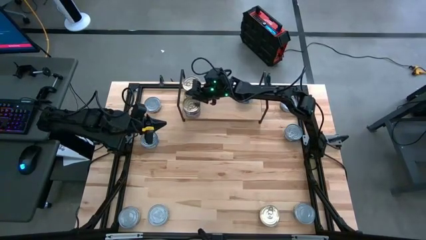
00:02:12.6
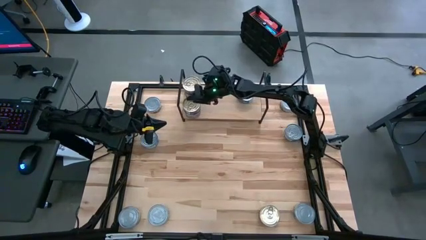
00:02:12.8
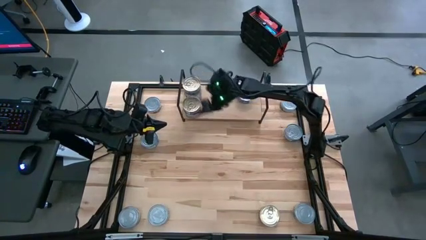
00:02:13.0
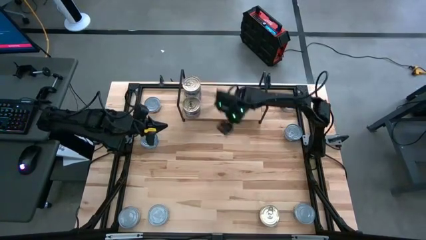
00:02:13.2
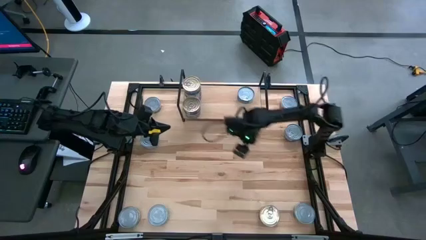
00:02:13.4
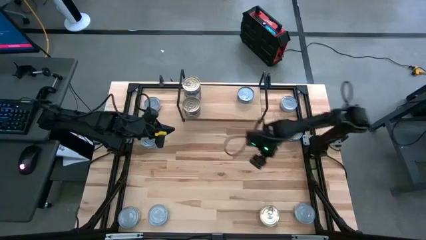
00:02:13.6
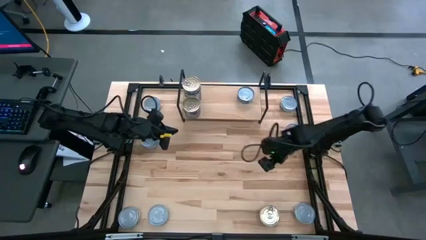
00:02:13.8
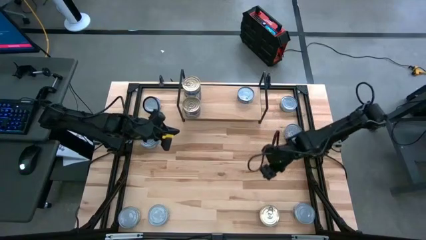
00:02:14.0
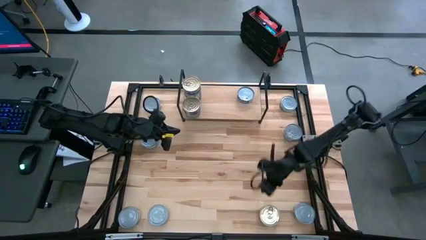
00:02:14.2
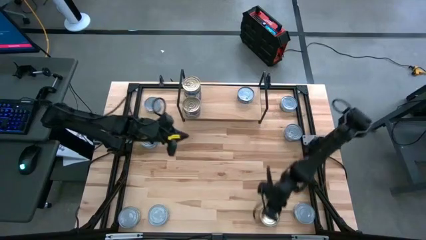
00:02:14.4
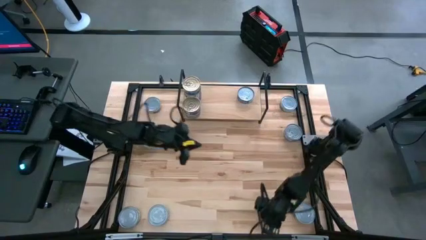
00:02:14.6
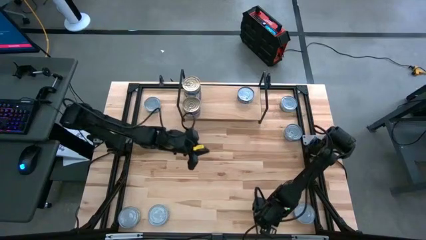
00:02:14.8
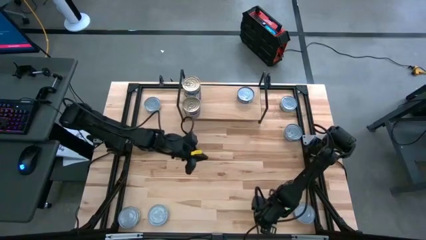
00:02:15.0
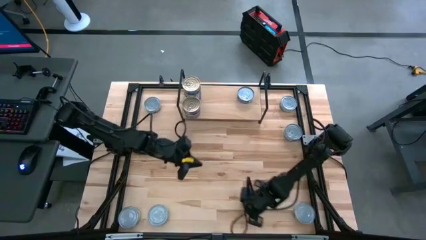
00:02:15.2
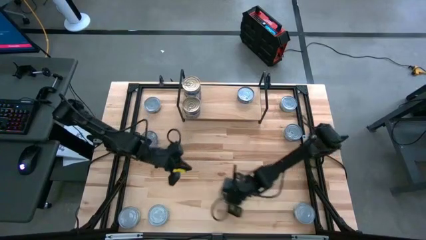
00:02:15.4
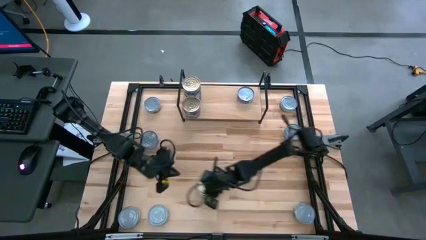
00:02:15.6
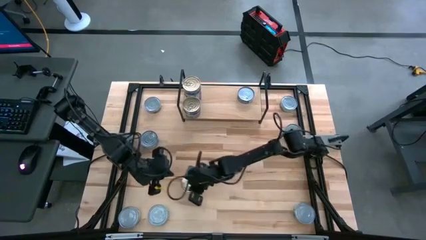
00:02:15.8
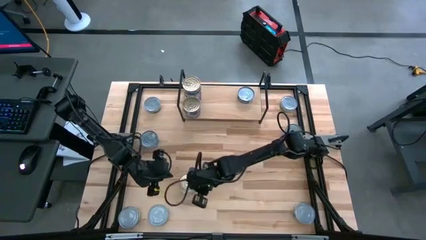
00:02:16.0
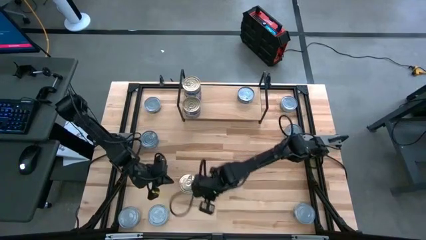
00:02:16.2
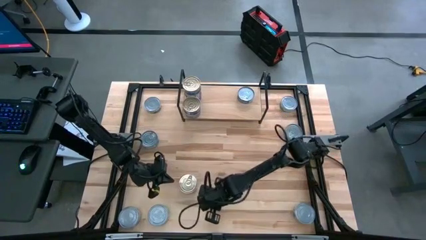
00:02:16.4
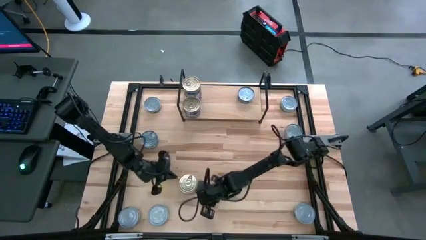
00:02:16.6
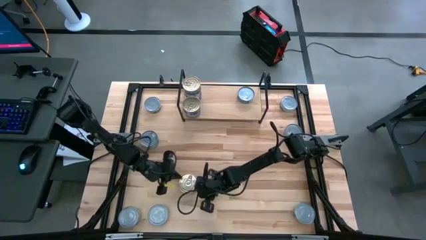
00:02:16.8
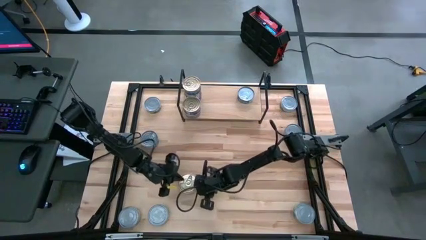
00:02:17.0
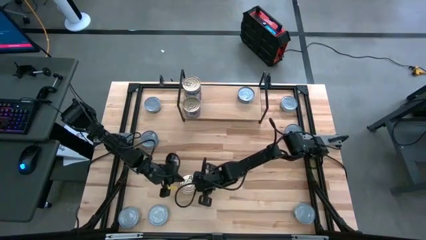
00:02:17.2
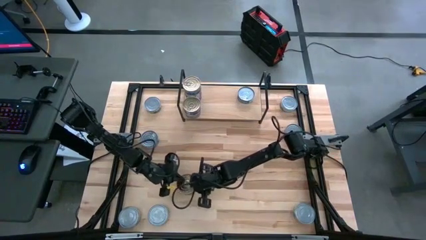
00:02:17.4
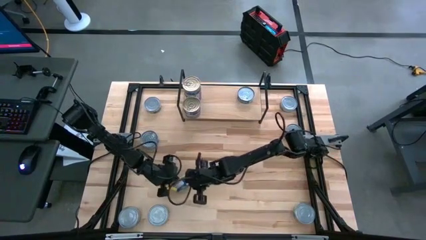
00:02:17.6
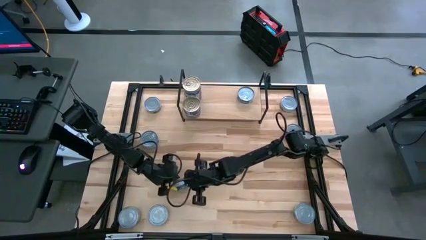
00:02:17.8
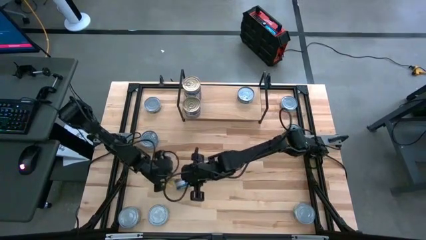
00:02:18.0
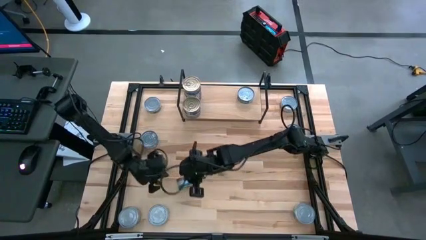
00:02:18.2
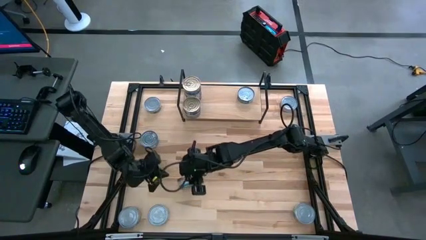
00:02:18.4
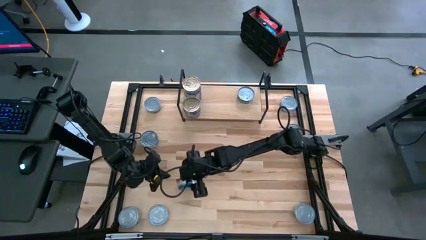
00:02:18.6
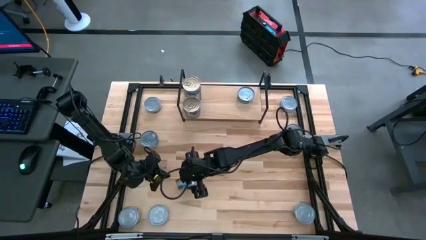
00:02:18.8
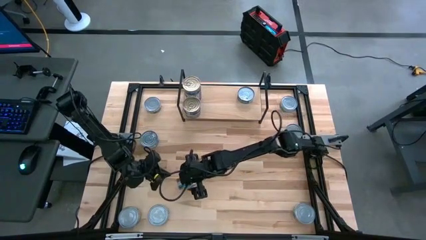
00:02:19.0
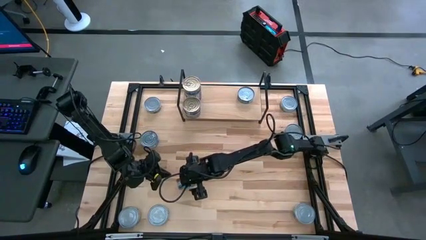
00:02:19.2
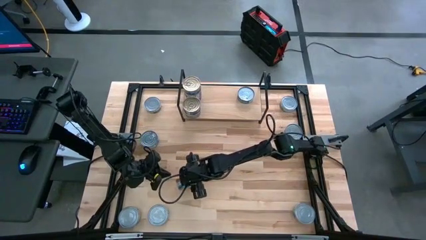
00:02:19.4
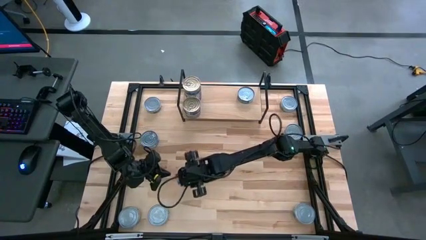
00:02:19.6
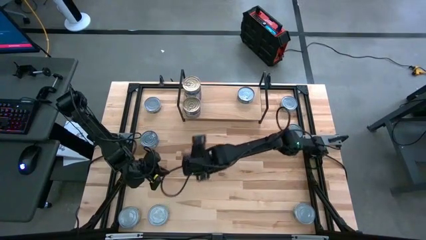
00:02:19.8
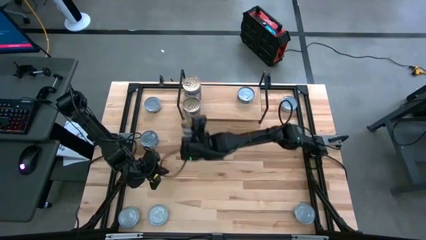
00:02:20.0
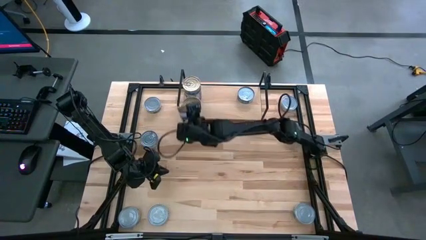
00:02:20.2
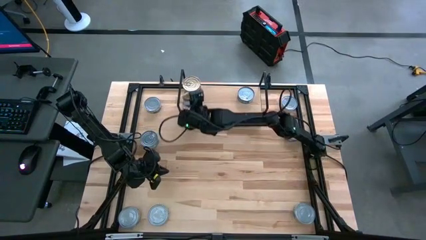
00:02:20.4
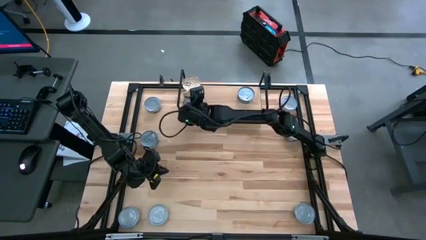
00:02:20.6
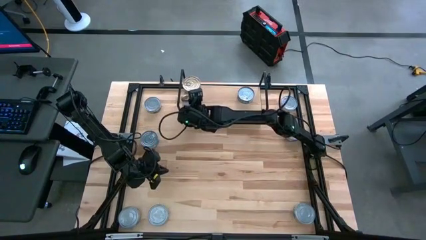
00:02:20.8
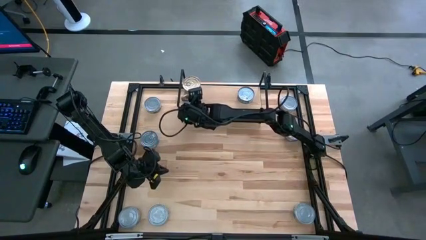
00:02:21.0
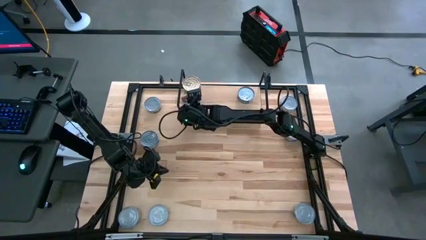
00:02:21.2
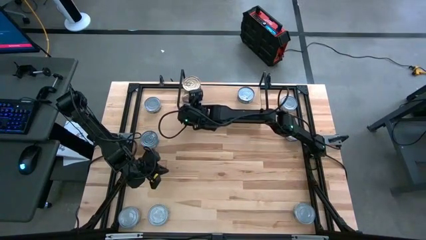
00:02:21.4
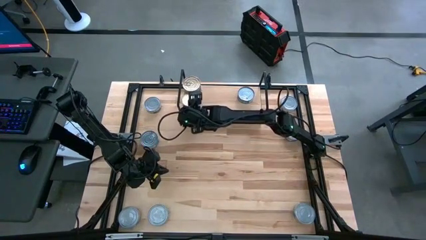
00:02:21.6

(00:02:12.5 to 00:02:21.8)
Task: Stack canned seafood by type on shelf
Stack the blue pink tuna can on top of the other blue pink tuna cans on the shelf

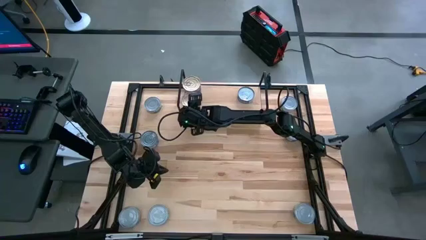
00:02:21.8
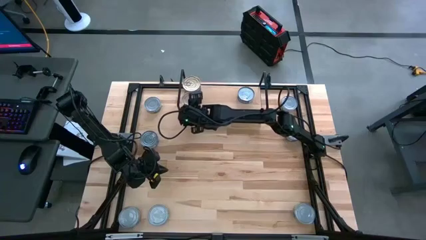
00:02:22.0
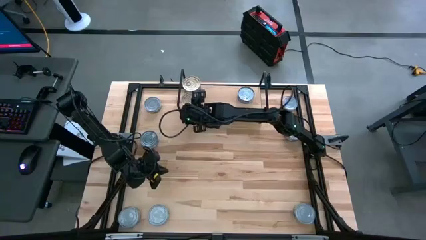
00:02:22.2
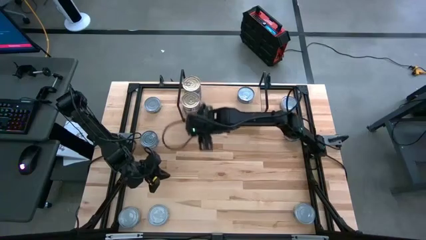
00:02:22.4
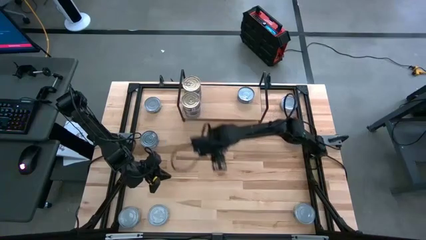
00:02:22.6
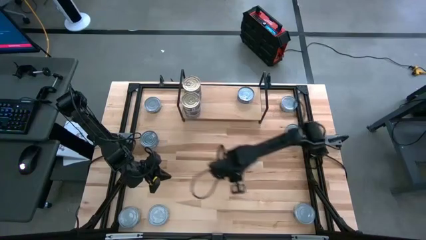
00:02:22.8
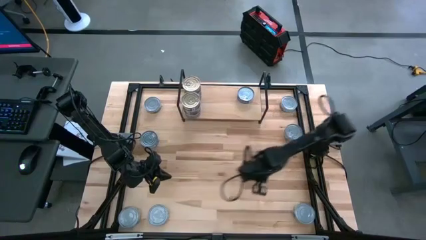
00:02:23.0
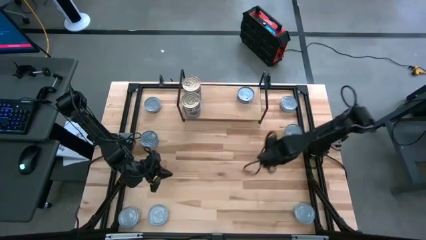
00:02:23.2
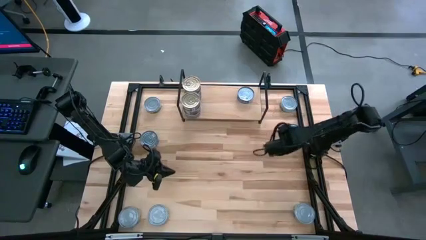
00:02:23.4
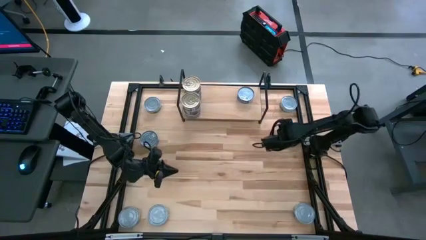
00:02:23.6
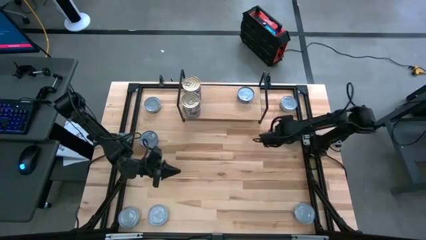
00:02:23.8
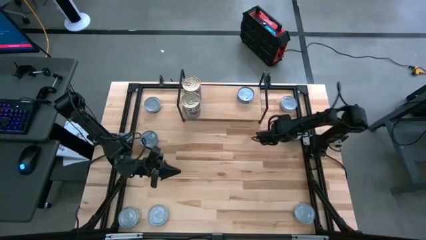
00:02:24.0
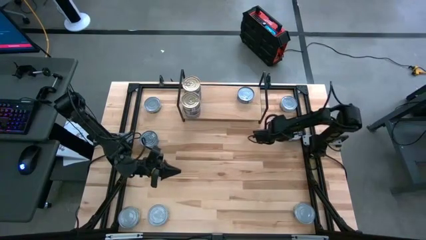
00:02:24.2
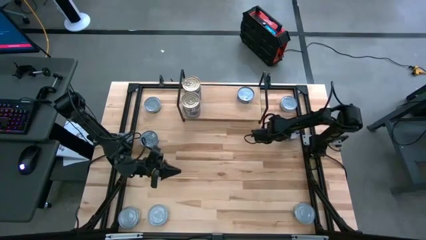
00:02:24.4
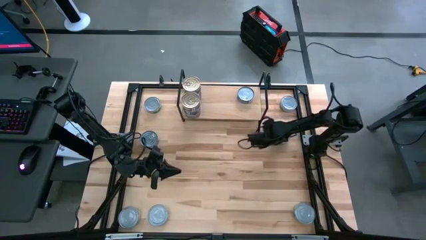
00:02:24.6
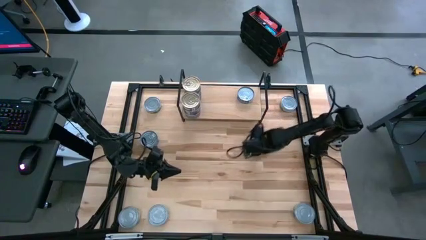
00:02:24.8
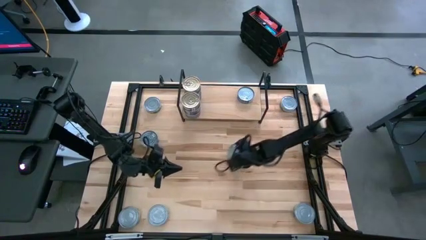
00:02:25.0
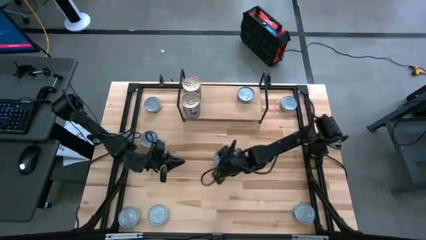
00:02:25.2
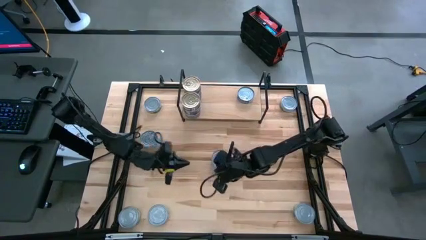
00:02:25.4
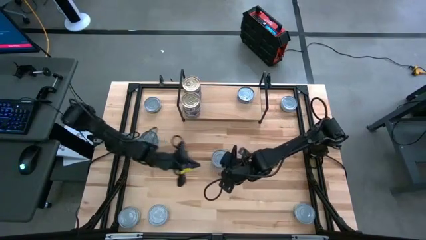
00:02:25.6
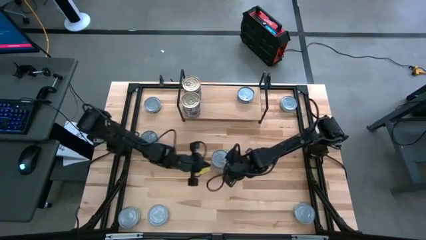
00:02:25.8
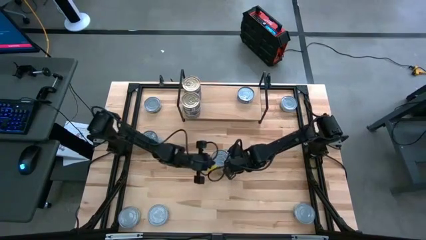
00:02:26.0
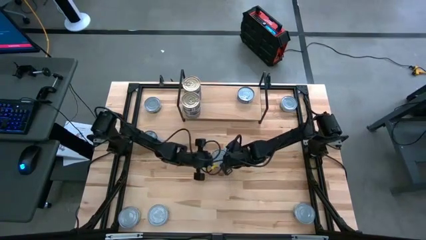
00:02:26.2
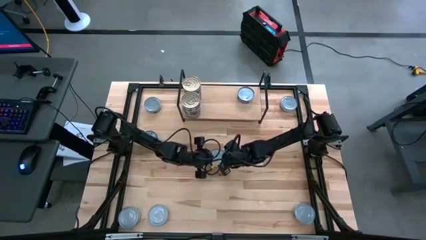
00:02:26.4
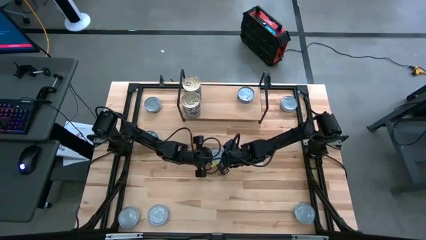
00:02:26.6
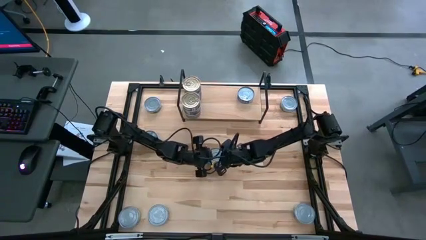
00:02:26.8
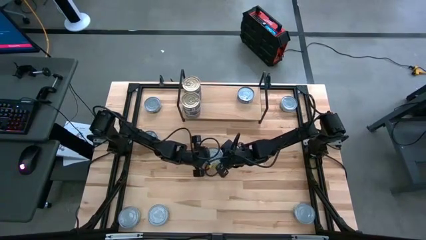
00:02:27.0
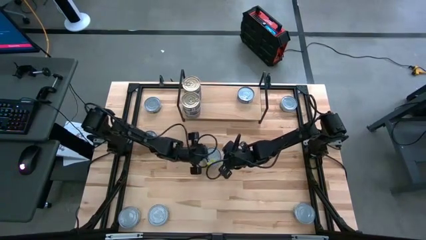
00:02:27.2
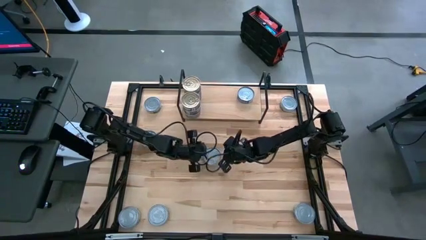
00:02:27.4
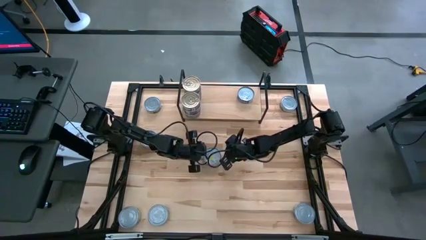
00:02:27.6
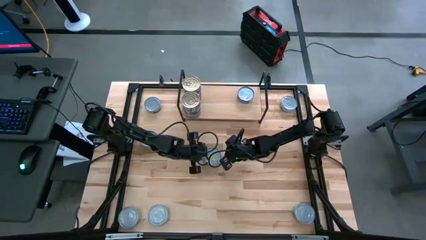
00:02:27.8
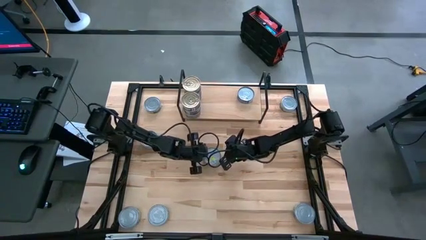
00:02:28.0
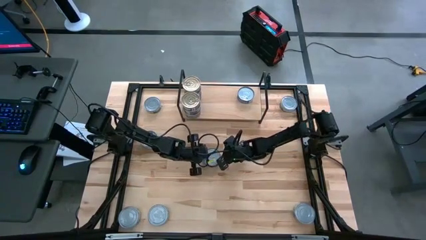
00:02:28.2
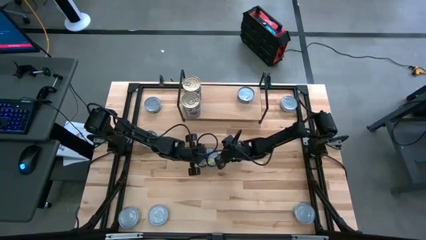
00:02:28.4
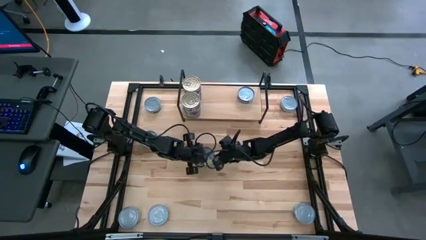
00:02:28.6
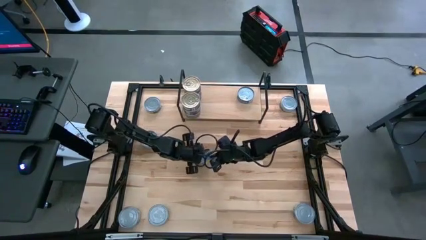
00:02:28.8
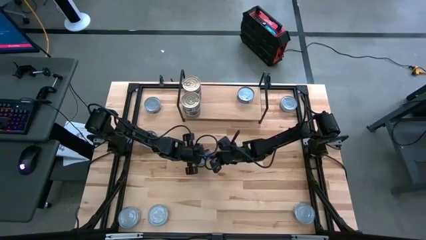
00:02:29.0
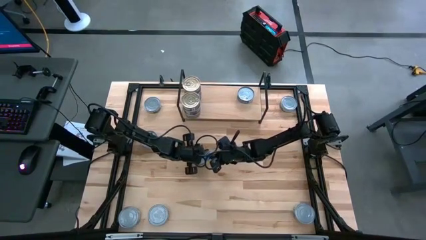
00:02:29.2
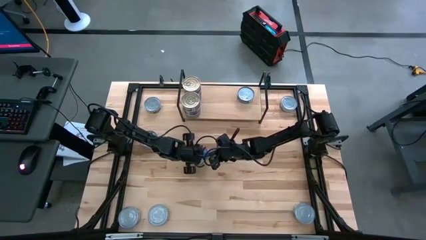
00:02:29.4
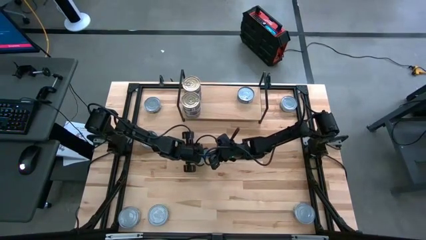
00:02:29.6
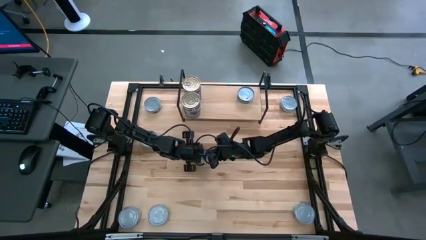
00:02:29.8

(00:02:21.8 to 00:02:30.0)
Stack the blue tuna can on top of the other blue tuna can on the shelf
